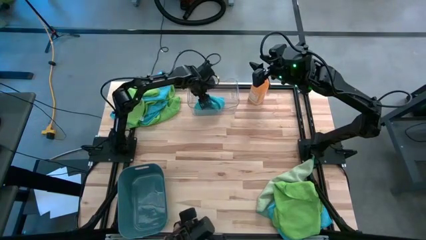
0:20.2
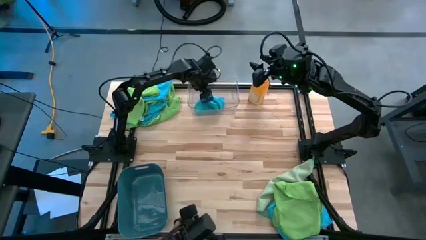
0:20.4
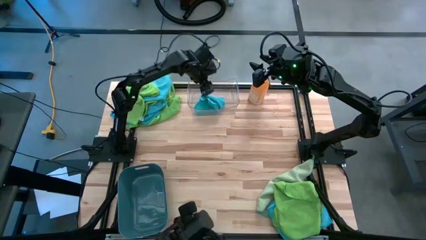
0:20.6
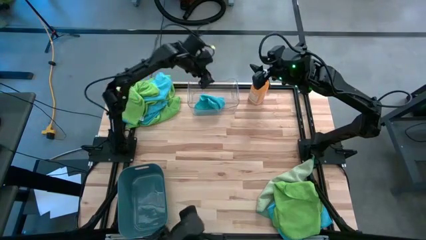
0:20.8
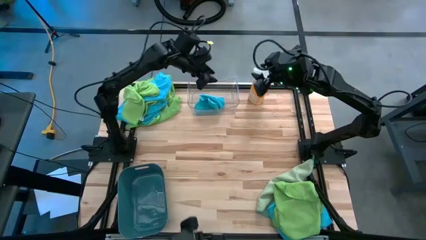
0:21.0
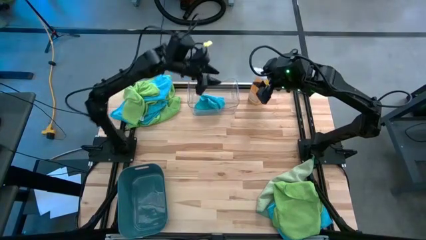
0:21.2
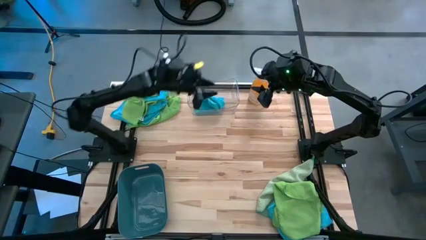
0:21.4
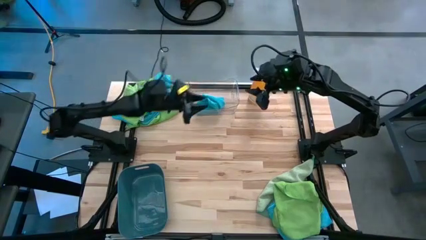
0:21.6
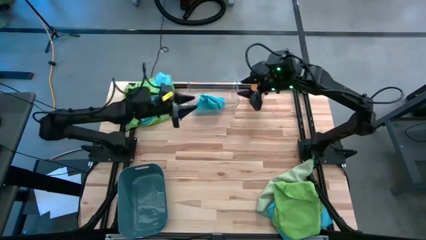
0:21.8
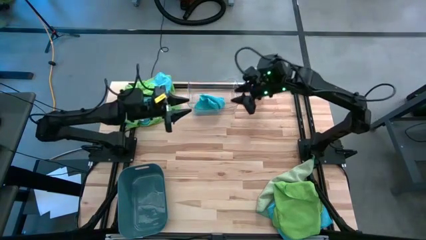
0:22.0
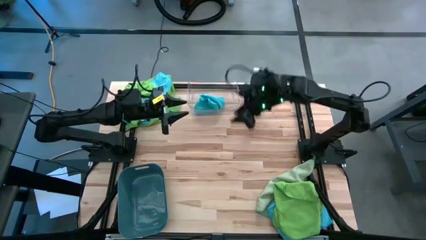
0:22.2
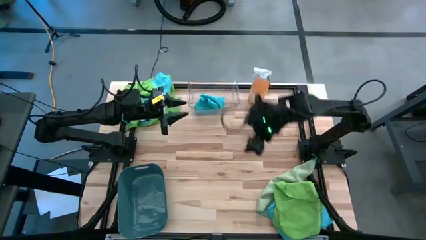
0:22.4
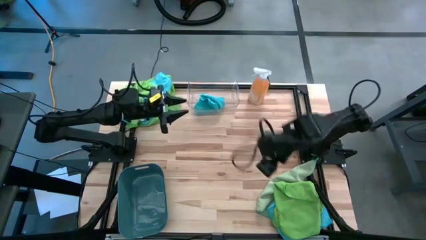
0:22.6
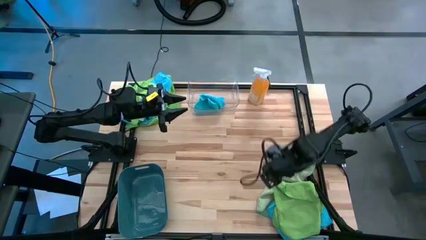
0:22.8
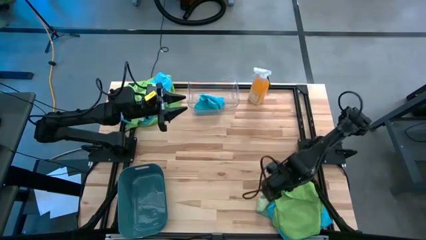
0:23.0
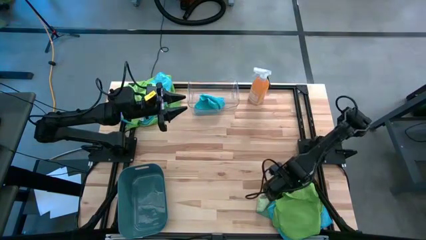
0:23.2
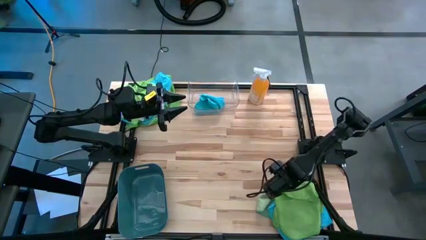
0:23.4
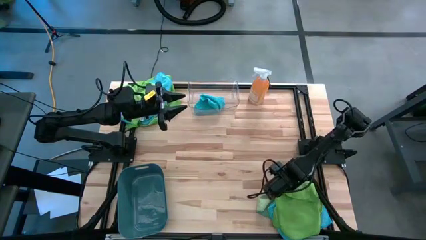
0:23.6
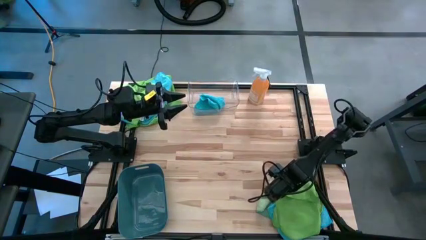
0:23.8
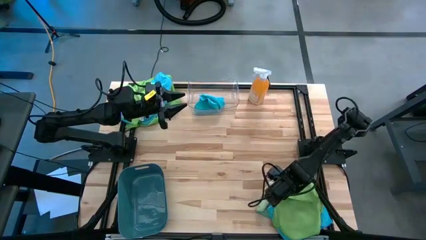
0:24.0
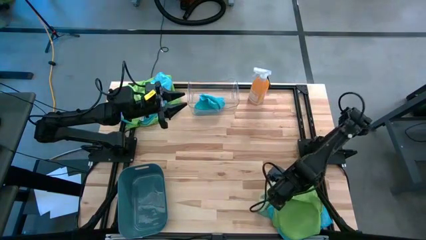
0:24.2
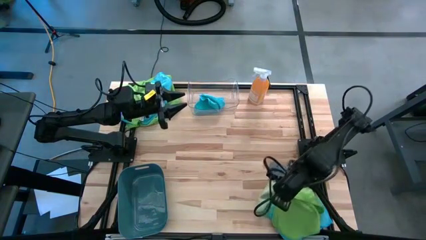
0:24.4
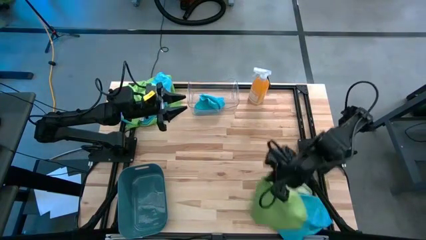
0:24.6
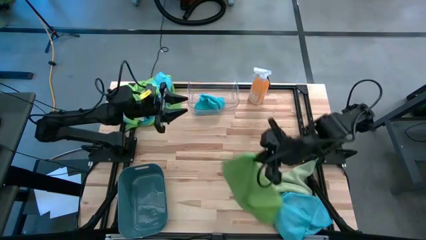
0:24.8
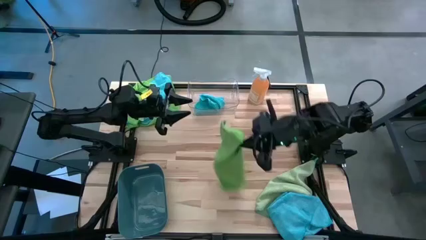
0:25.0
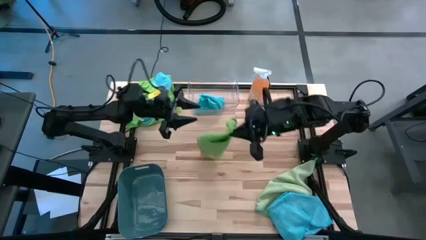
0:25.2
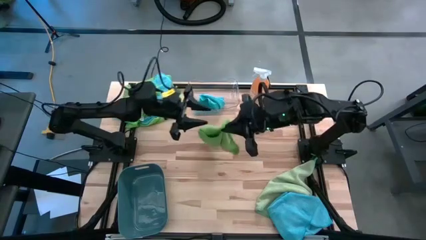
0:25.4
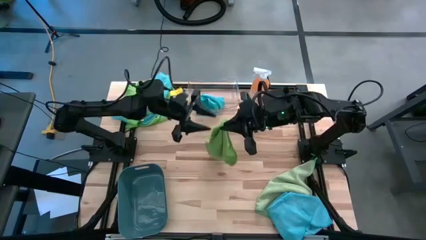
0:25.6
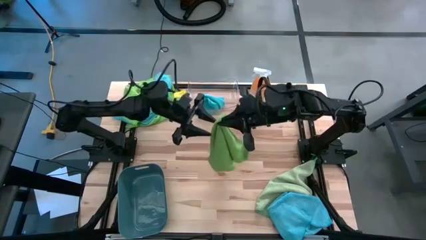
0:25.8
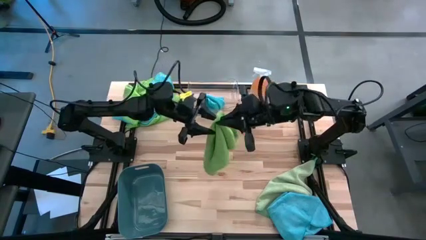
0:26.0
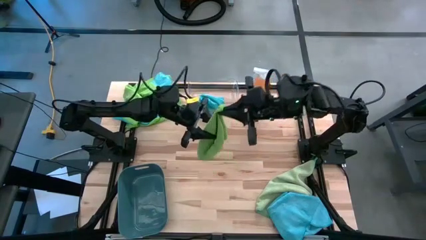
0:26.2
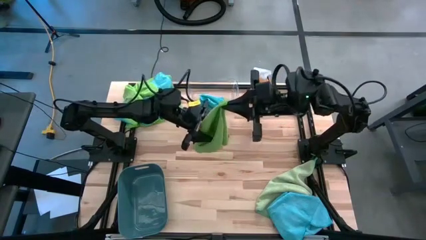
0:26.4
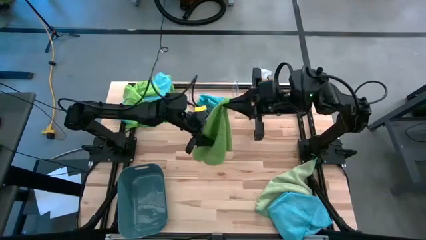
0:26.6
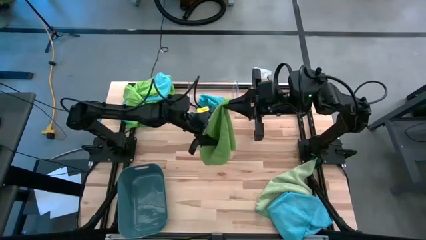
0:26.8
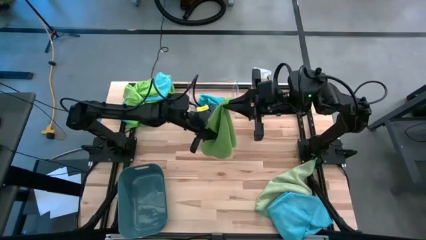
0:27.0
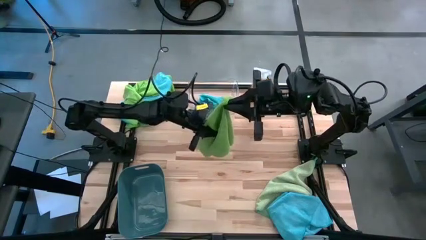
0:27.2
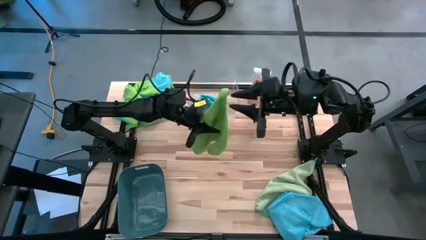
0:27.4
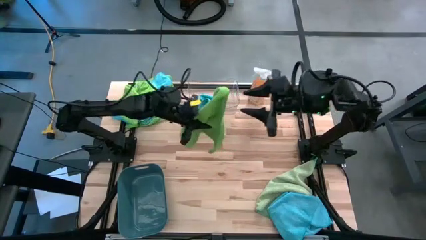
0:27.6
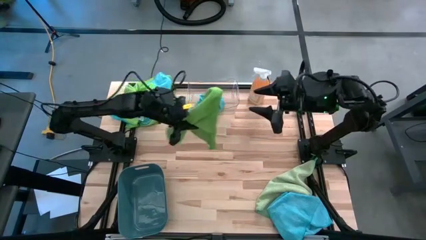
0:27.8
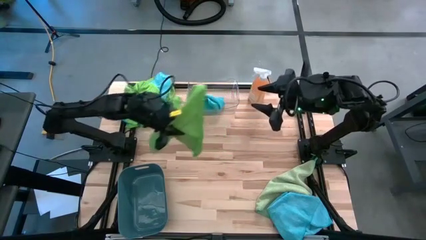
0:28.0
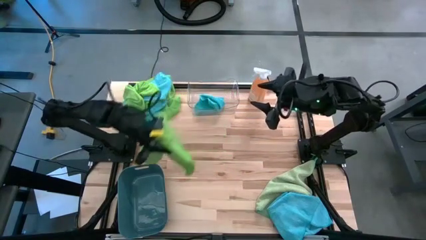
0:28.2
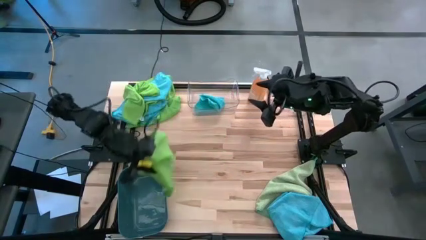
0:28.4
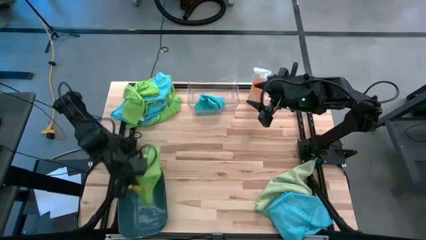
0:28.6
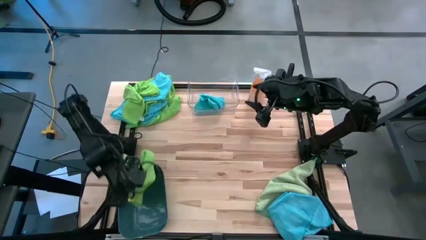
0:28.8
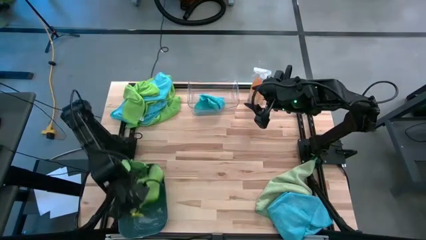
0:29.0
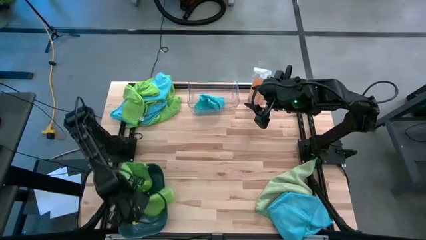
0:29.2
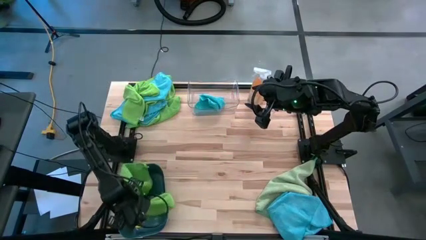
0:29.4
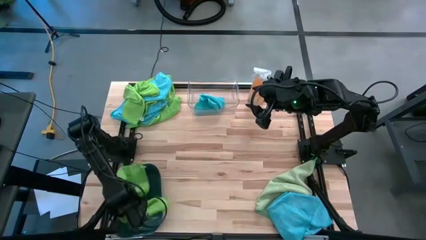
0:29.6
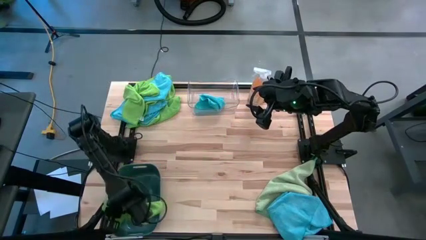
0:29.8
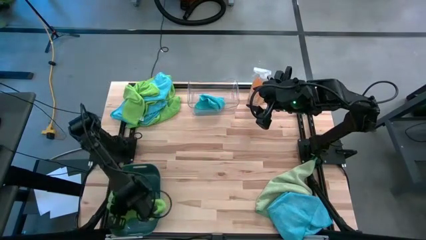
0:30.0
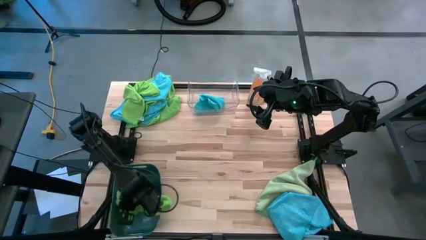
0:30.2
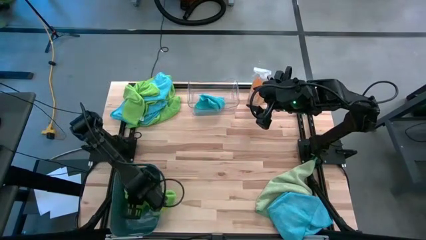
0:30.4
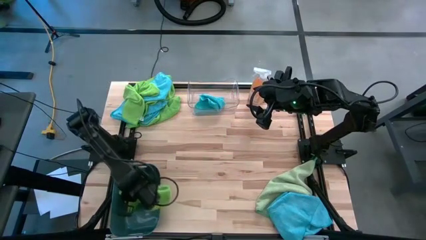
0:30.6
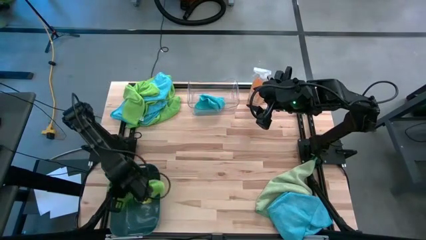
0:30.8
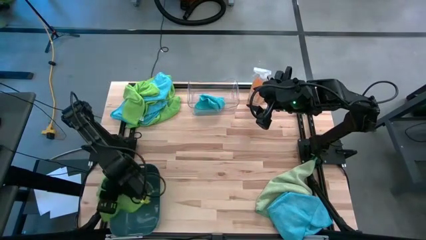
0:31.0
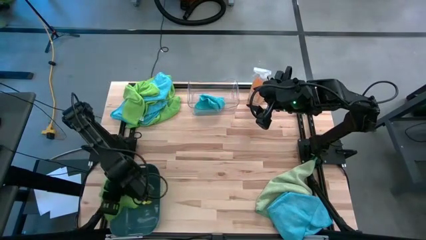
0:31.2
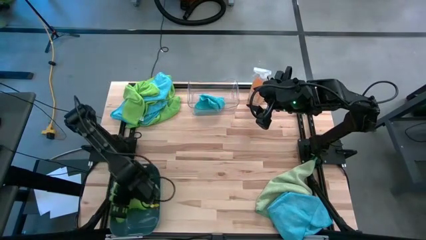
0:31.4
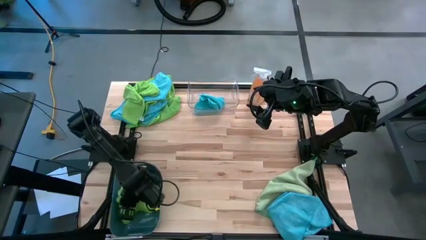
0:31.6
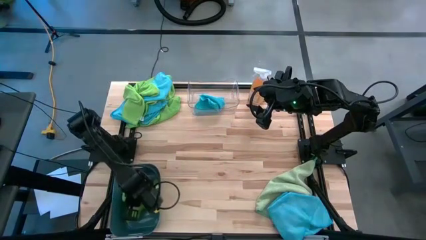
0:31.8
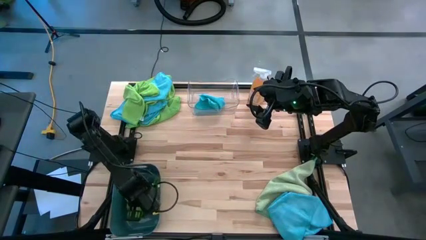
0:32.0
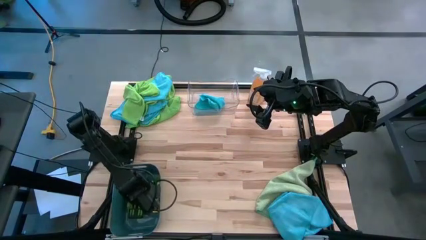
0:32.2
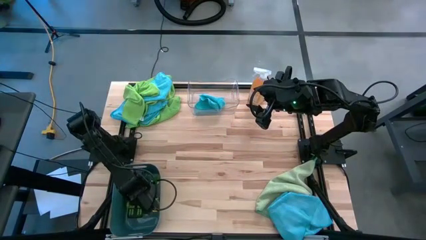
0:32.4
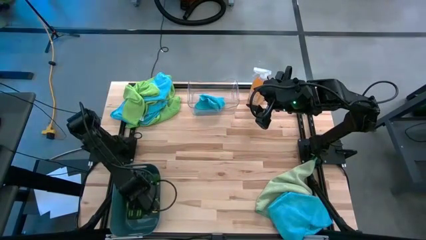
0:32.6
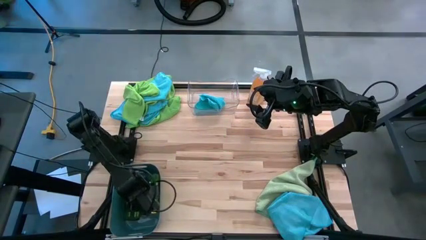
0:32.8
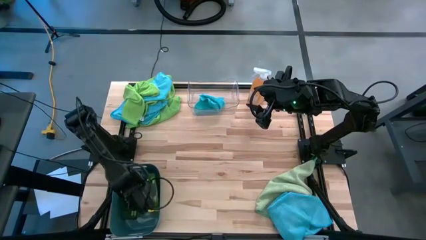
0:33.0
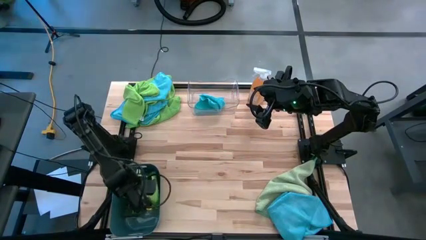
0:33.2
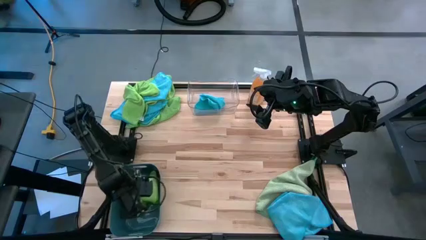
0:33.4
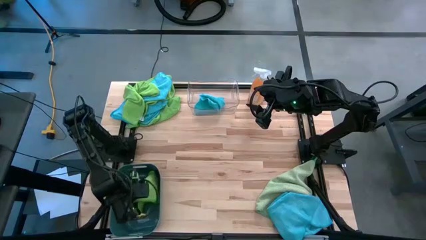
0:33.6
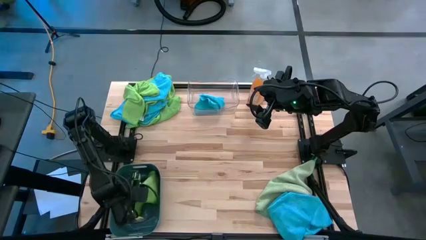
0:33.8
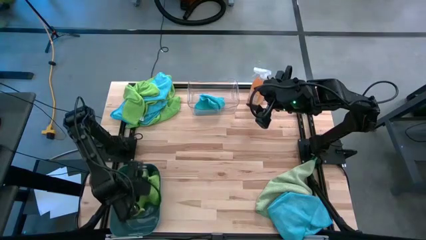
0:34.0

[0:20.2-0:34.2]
Task: Sort microfiber towel by color & place in baskets
Put the green microfiber towel into the blue bin
